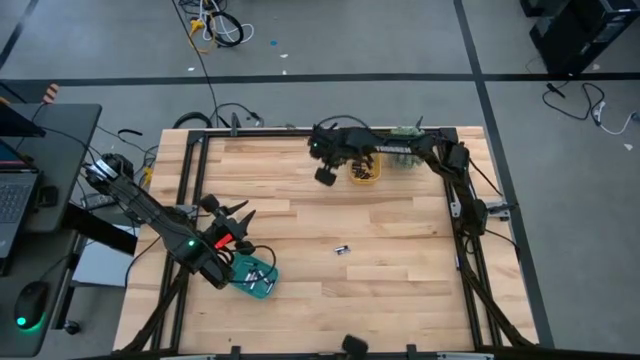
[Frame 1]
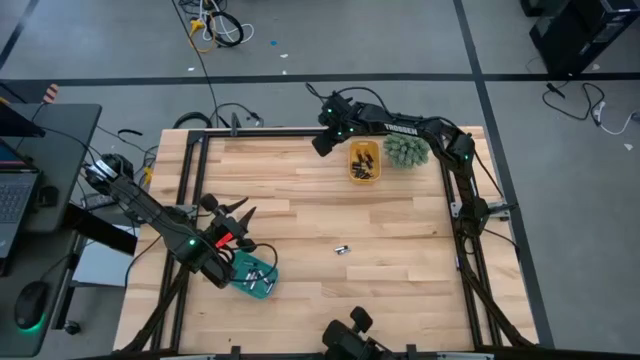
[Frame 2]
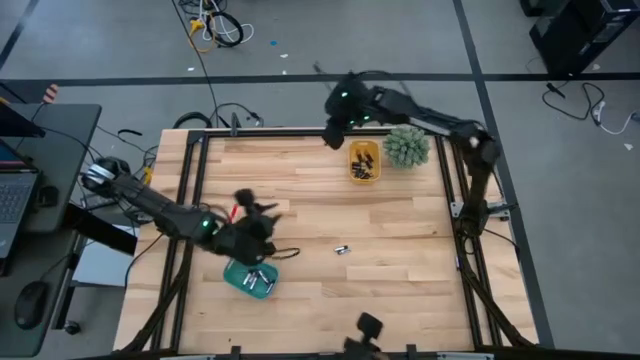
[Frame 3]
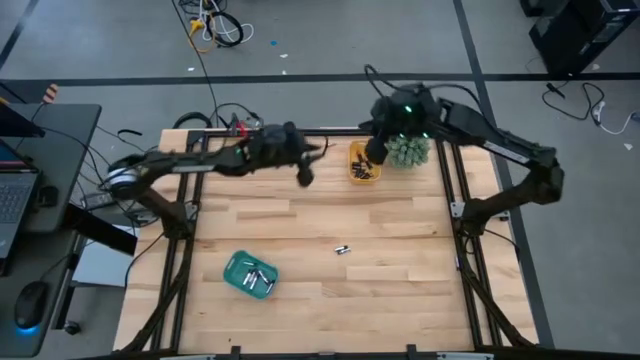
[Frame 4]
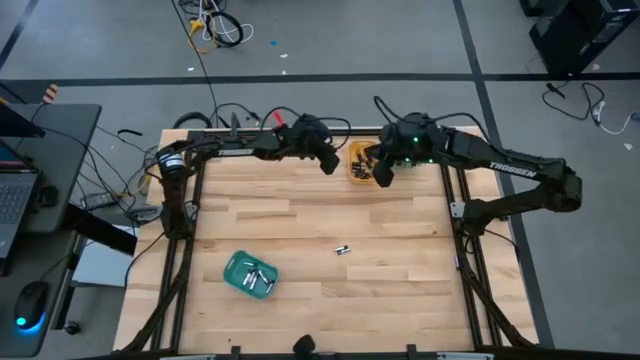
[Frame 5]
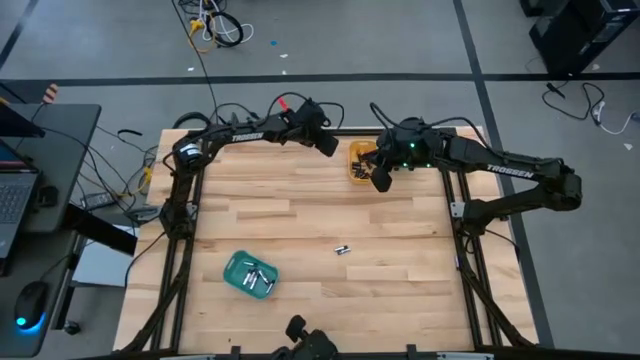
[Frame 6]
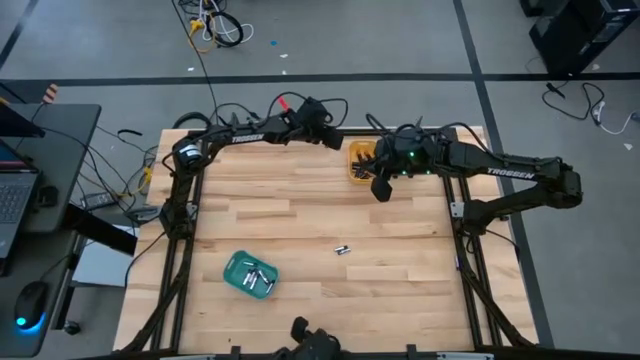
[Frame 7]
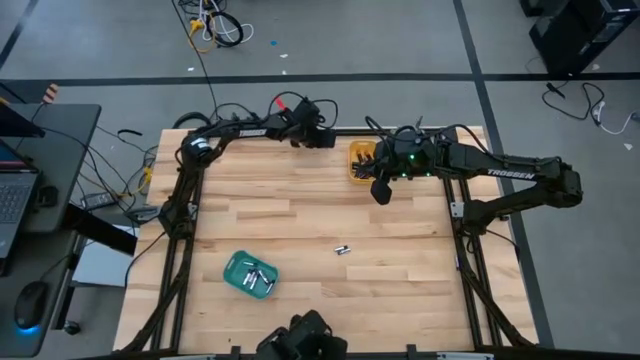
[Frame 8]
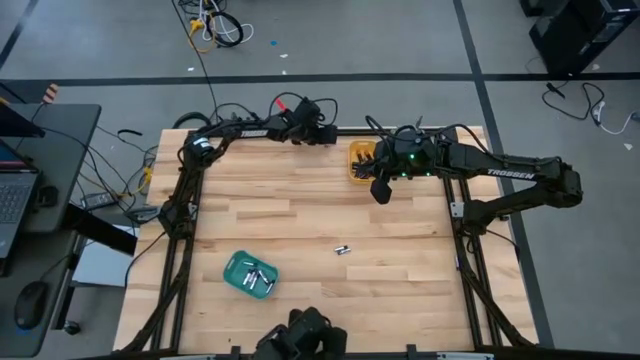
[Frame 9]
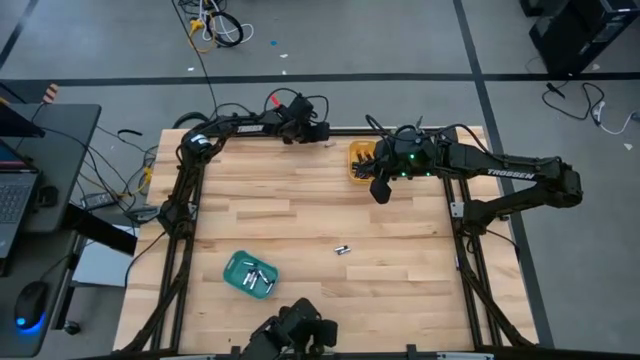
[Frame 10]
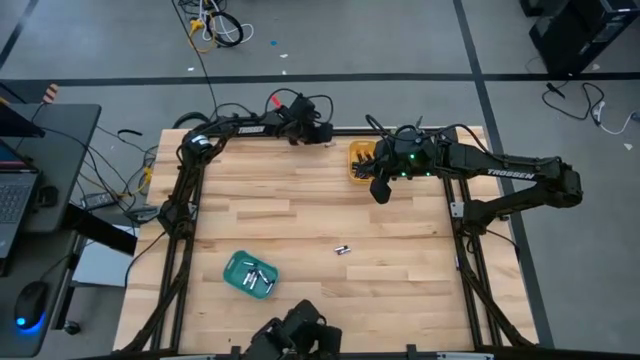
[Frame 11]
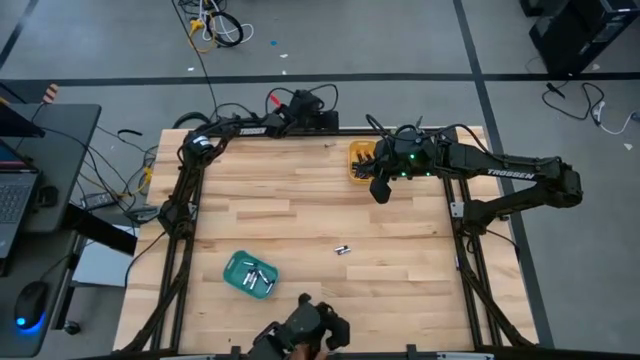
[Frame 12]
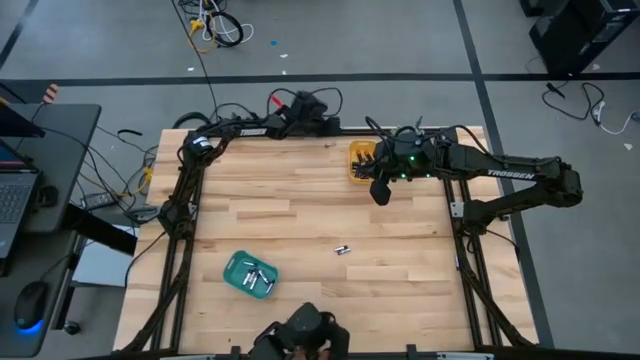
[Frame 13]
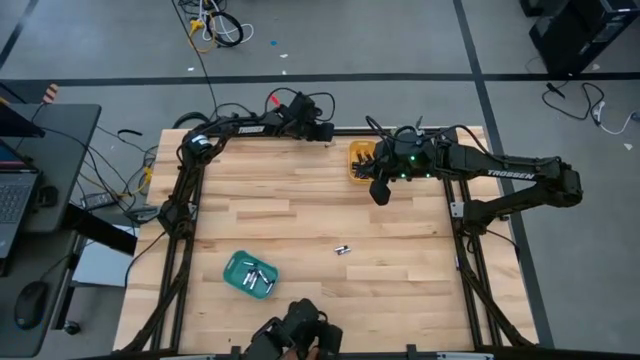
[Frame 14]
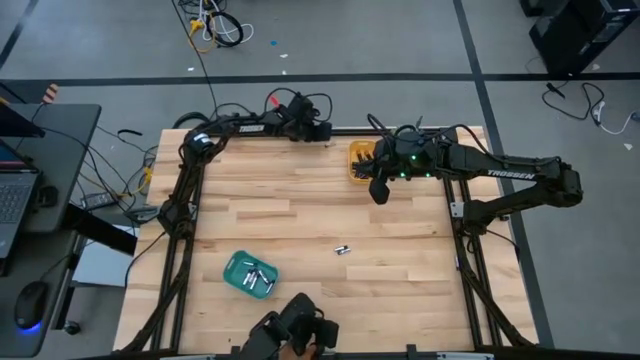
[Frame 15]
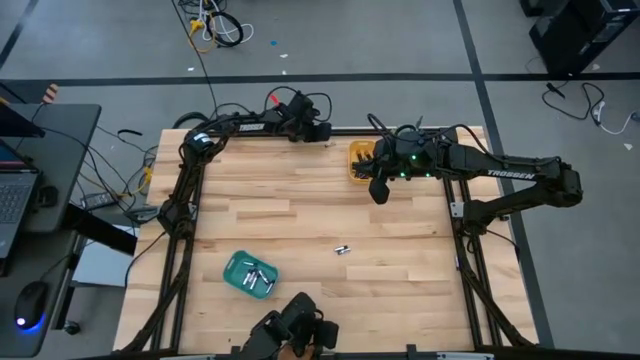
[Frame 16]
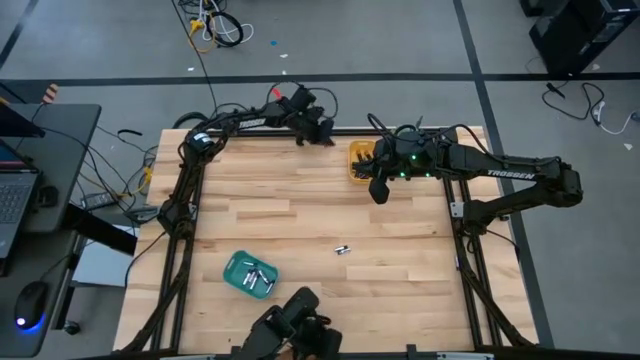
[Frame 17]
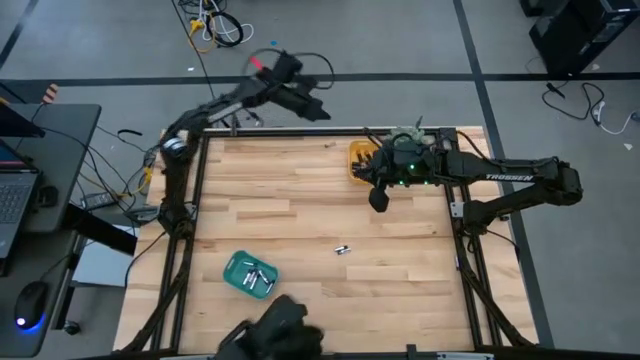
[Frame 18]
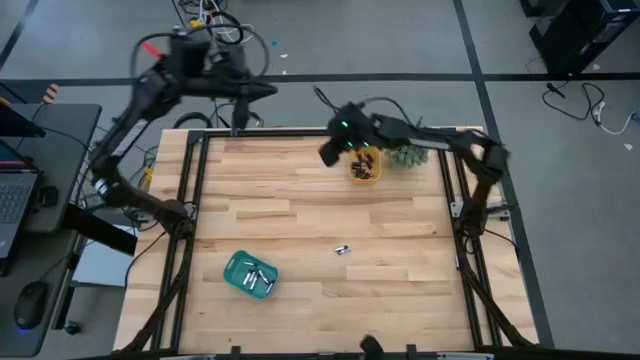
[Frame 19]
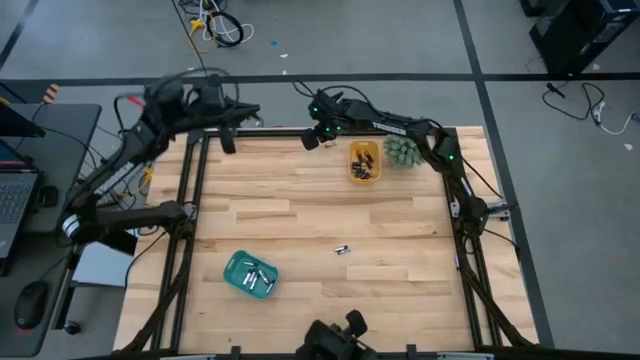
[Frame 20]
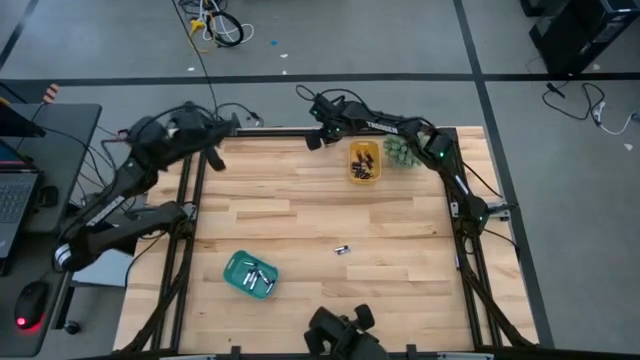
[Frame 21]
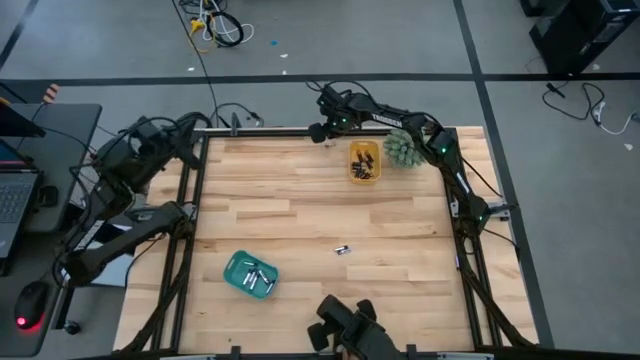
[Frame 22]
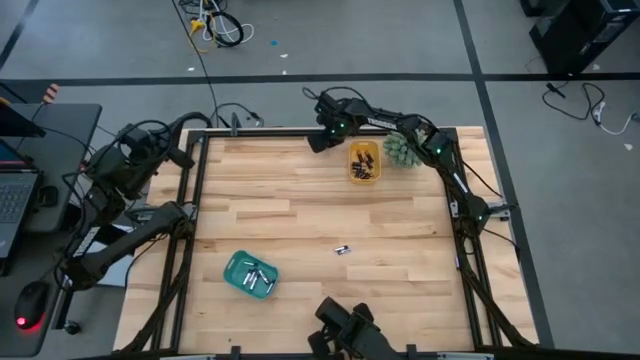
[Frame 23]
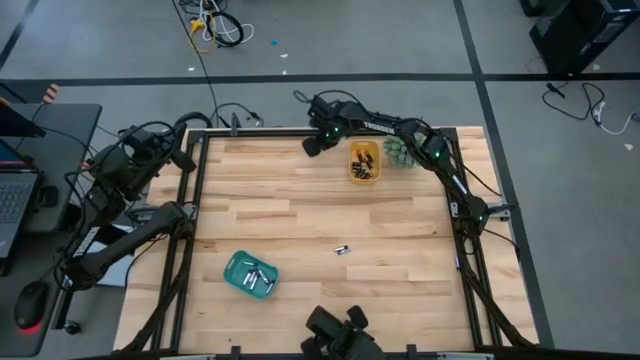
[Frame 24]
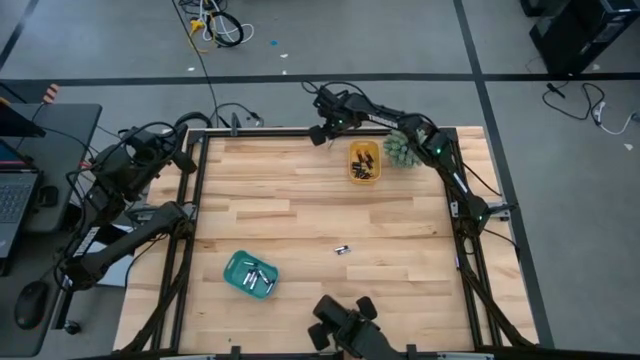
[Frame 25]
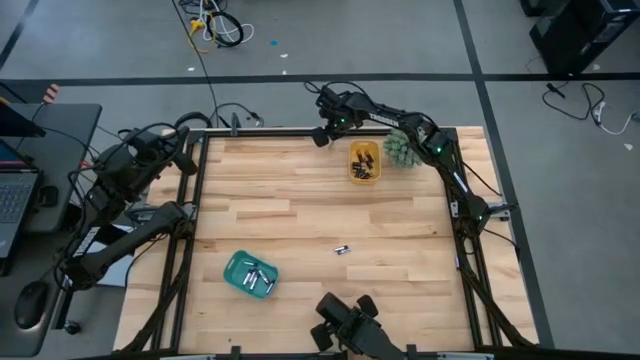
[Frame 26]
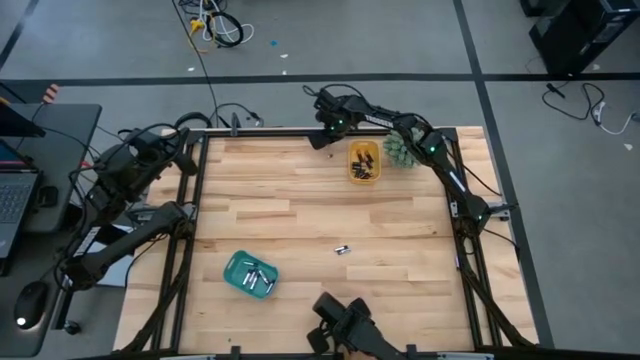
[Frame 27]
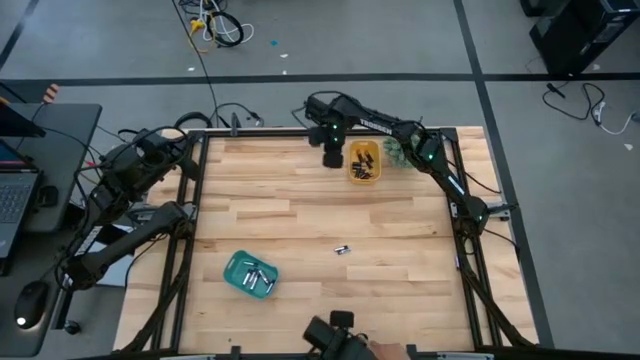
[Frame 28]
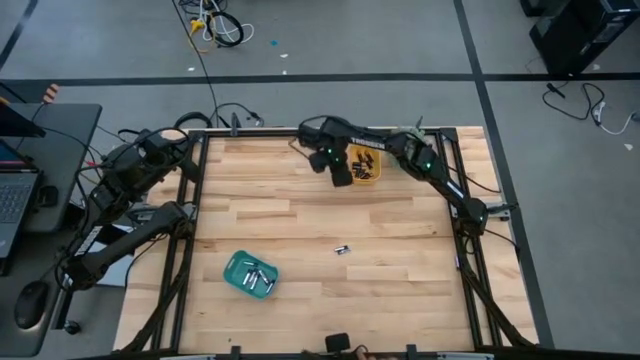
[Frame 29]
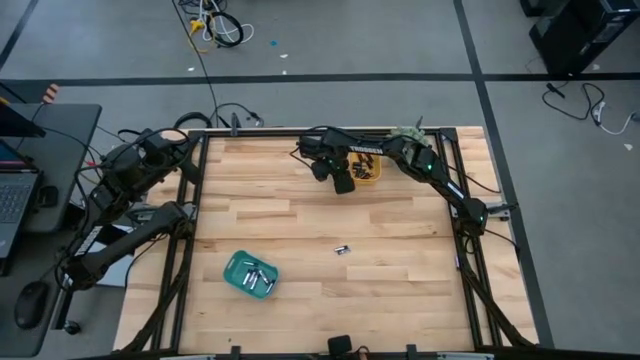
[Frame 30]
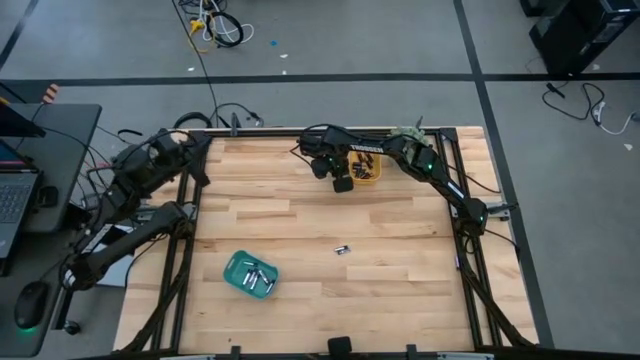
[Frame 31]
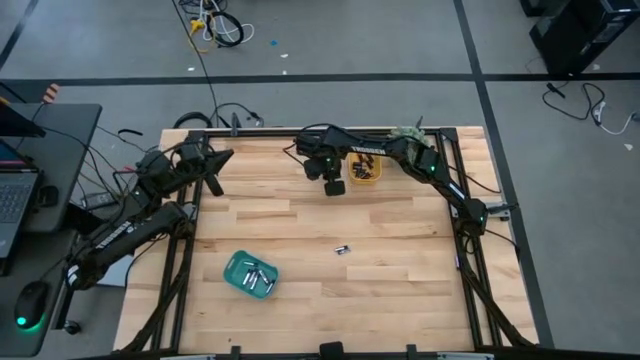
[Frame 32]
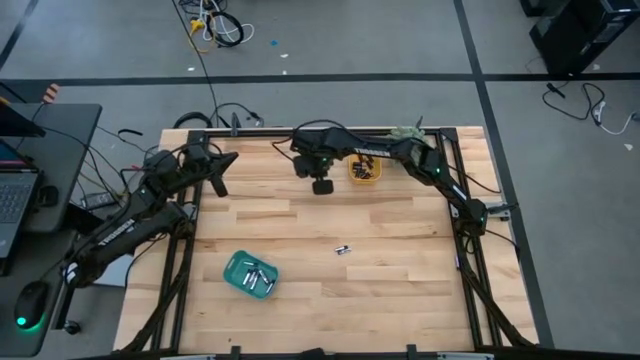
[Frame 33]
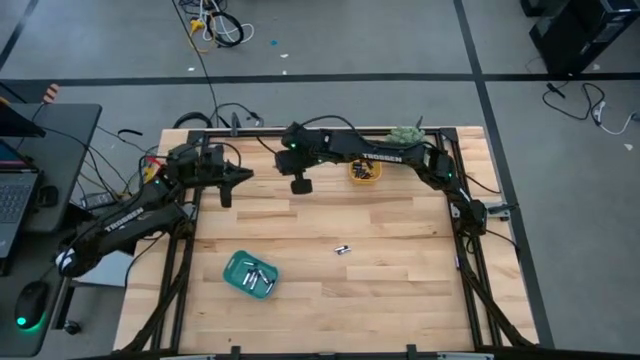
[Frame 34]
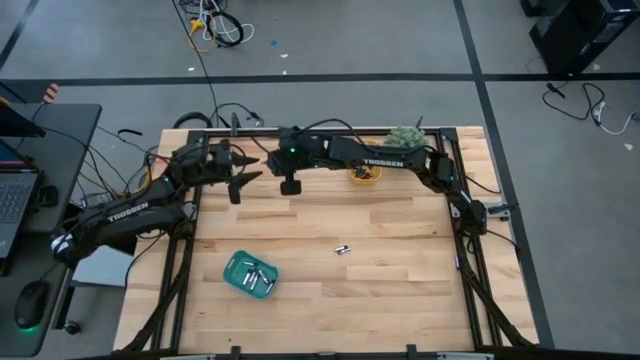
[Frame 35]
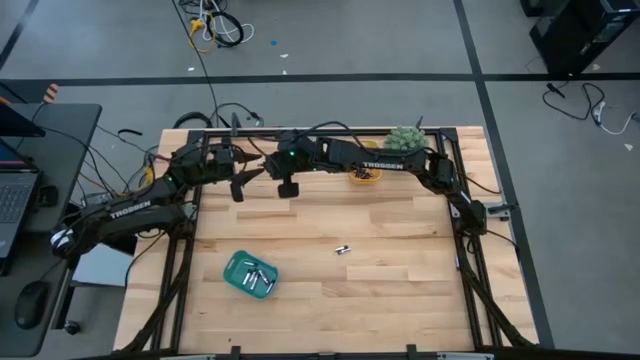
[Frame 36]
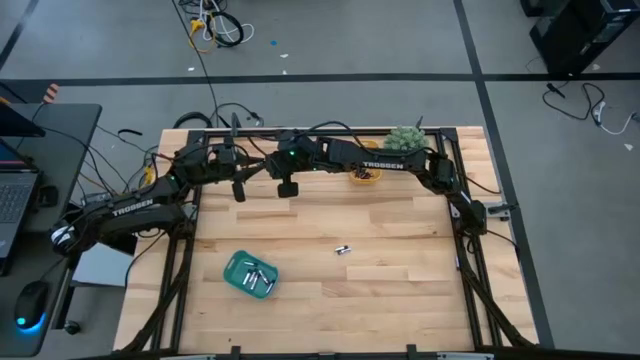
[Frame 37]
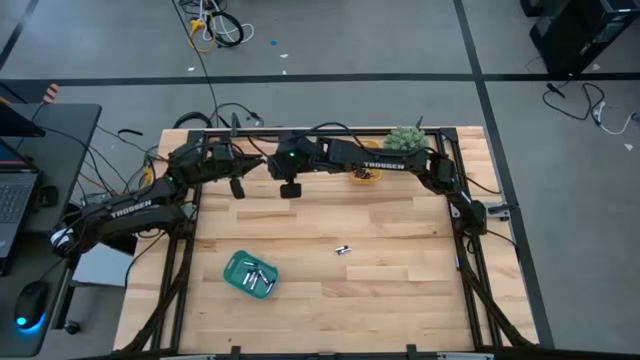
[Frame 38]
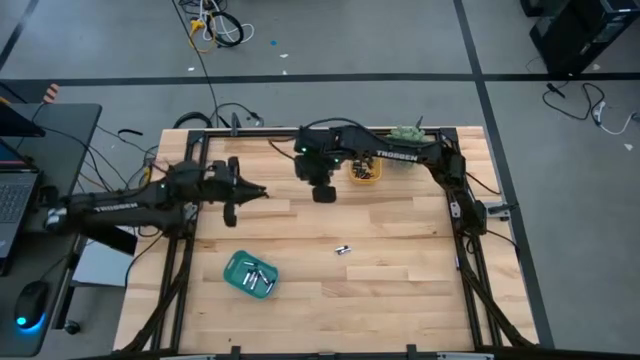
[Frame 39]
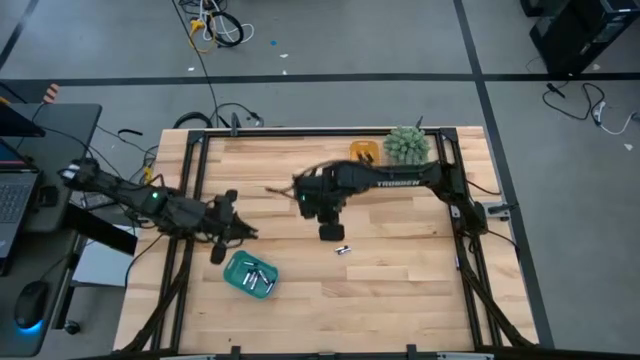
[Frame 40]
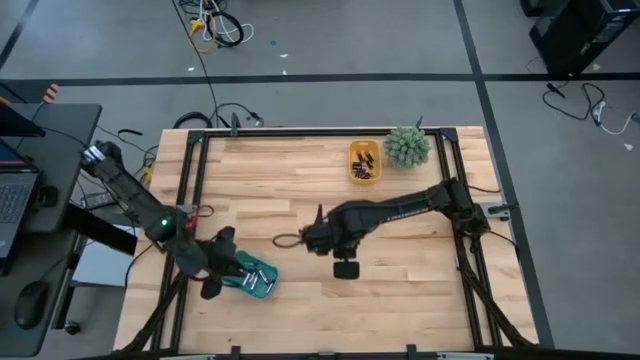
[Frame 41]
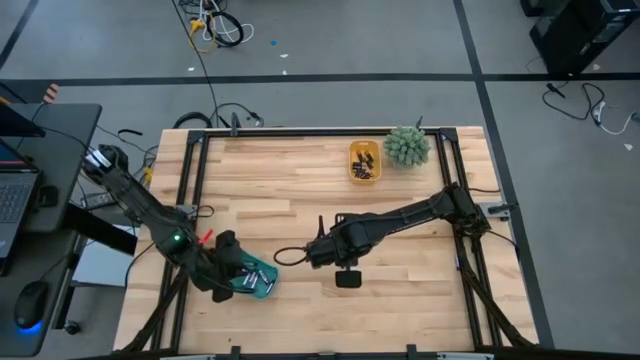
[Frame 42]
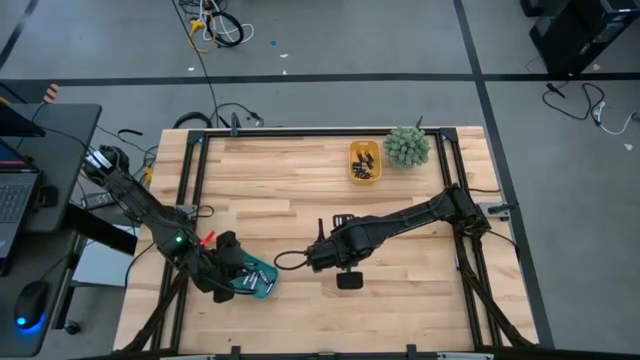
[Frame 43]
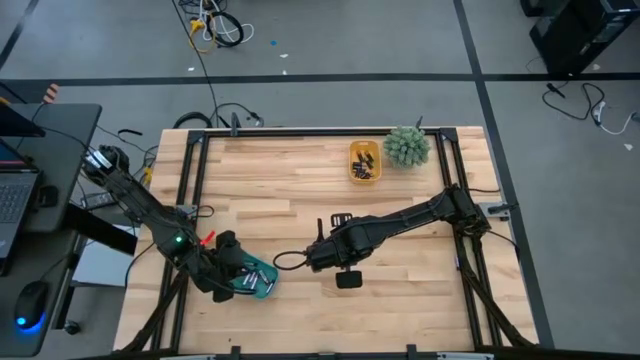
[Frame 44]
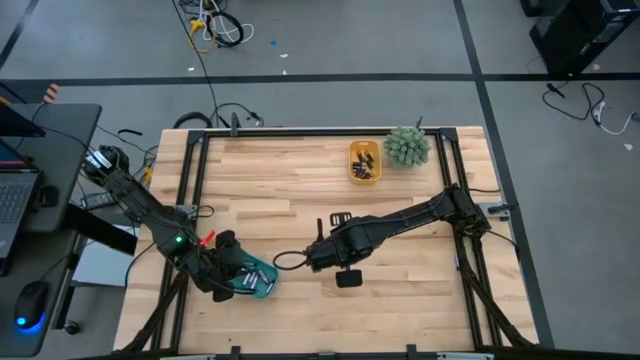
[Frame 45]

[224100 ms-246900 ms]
Task: Sort batteries
Put the silver battery into the green bin
